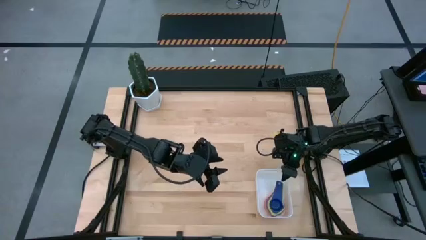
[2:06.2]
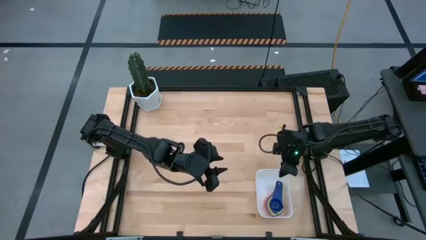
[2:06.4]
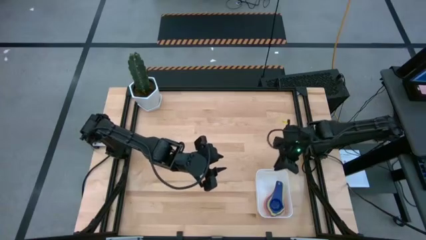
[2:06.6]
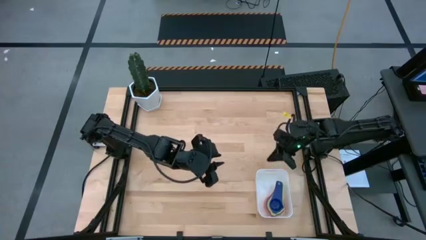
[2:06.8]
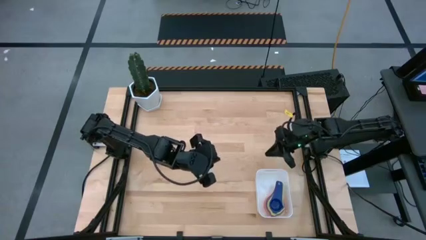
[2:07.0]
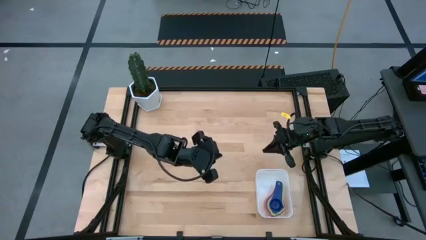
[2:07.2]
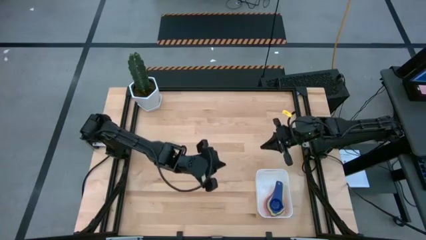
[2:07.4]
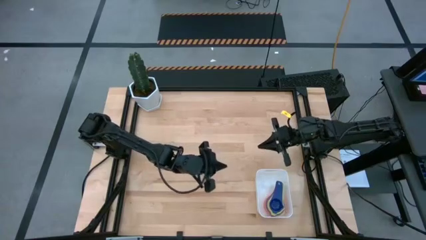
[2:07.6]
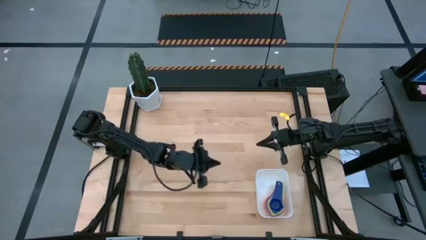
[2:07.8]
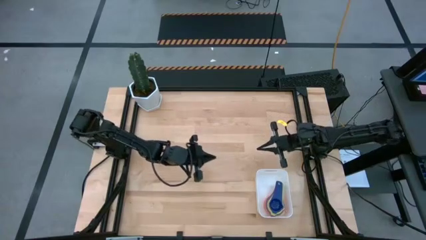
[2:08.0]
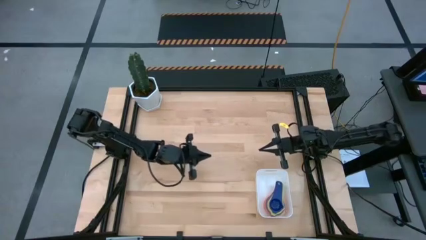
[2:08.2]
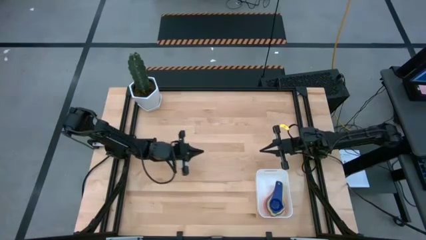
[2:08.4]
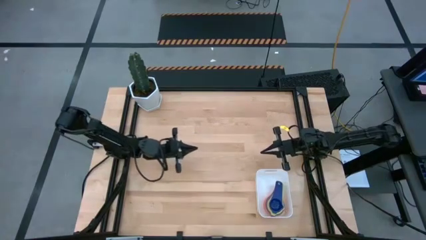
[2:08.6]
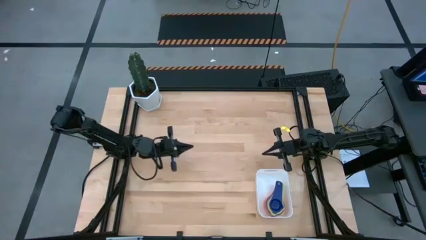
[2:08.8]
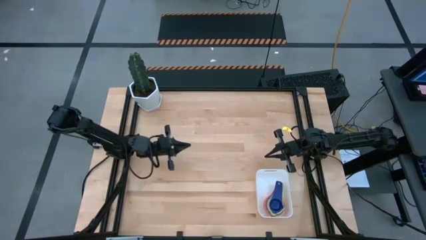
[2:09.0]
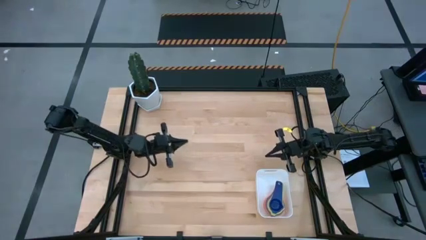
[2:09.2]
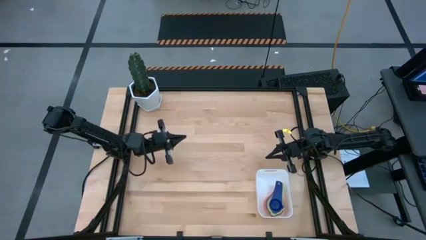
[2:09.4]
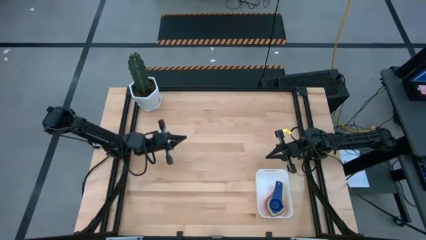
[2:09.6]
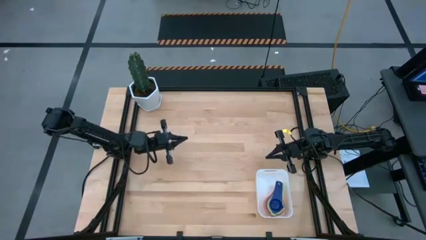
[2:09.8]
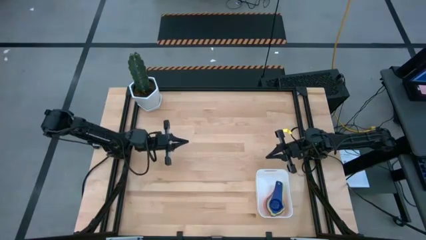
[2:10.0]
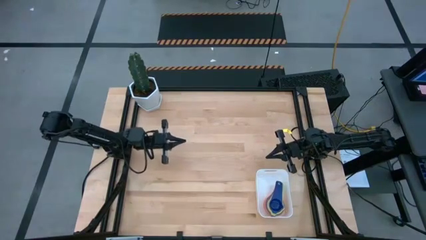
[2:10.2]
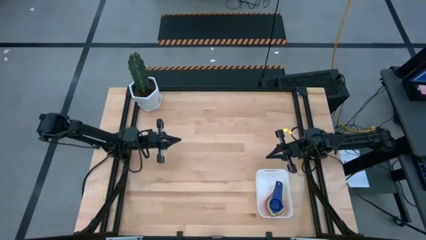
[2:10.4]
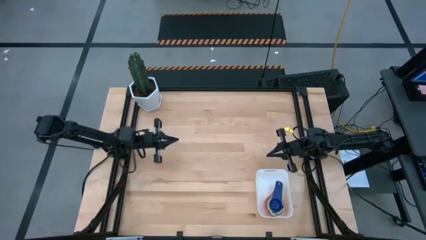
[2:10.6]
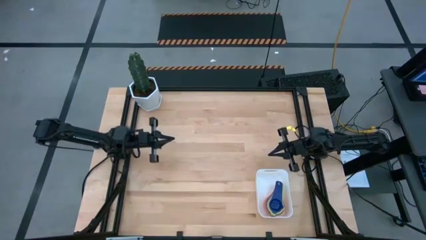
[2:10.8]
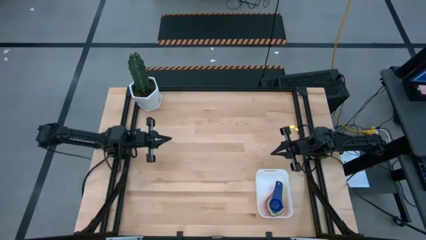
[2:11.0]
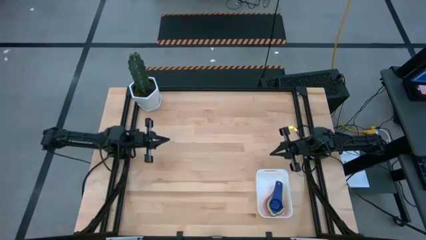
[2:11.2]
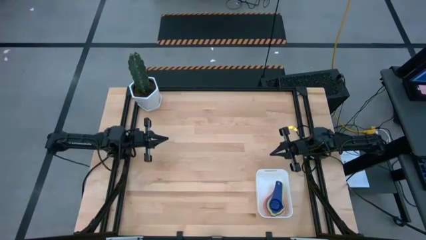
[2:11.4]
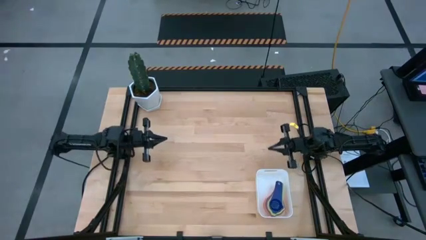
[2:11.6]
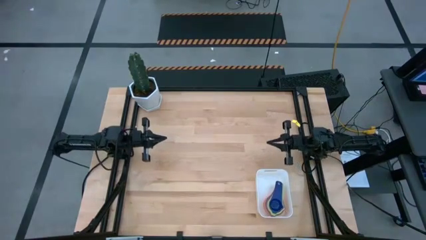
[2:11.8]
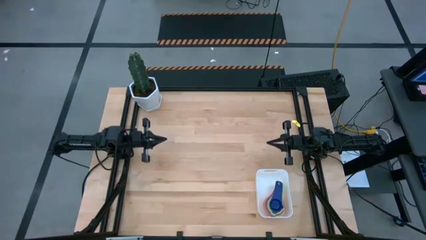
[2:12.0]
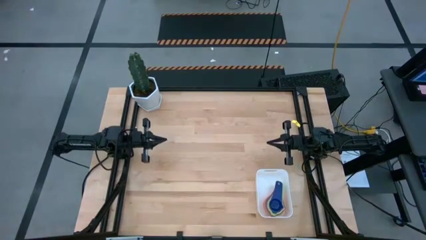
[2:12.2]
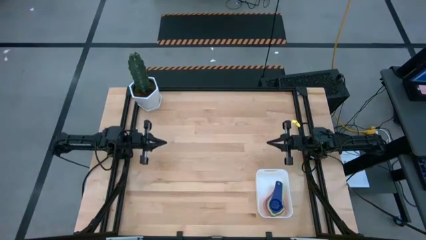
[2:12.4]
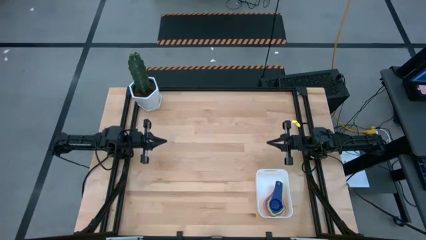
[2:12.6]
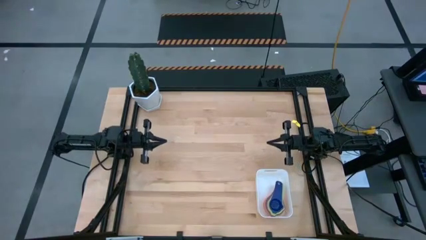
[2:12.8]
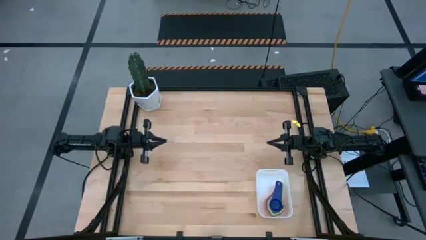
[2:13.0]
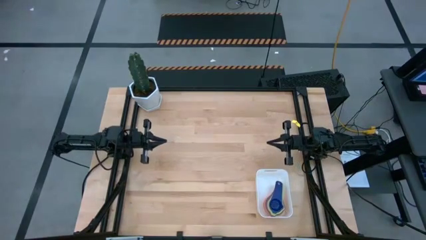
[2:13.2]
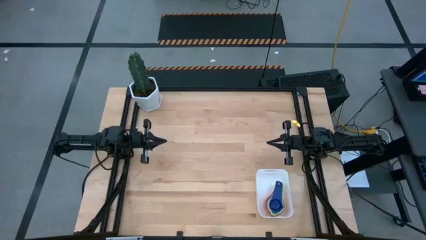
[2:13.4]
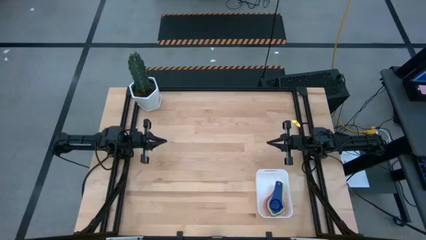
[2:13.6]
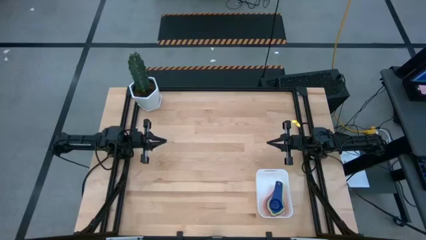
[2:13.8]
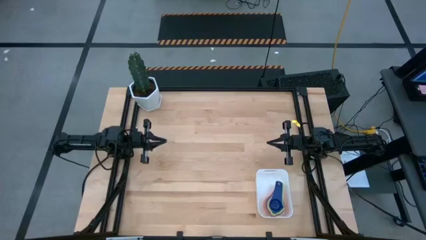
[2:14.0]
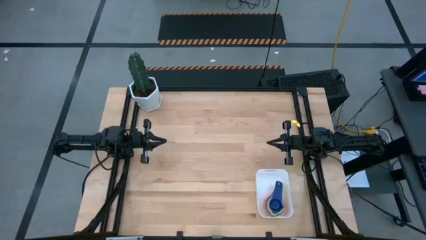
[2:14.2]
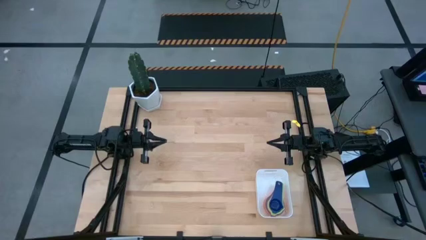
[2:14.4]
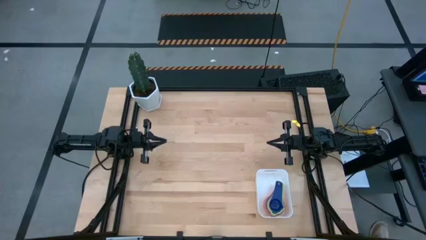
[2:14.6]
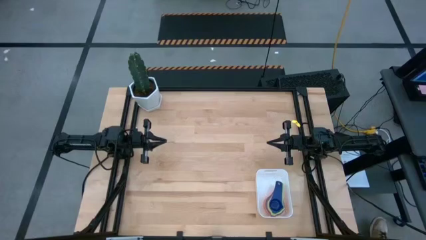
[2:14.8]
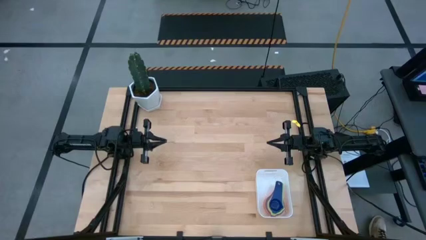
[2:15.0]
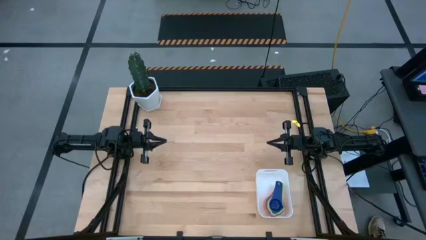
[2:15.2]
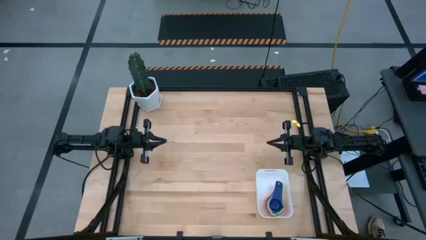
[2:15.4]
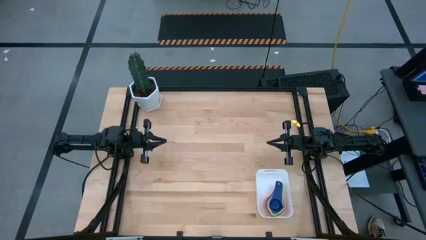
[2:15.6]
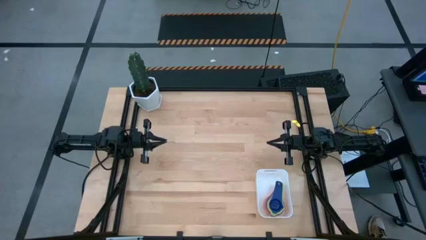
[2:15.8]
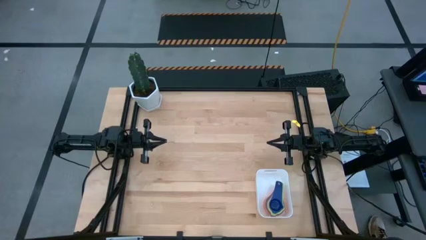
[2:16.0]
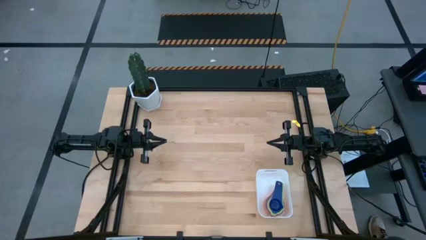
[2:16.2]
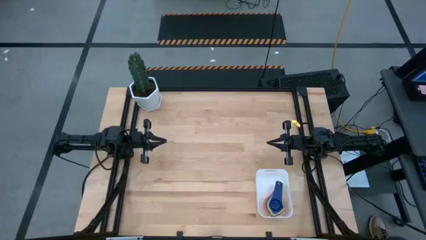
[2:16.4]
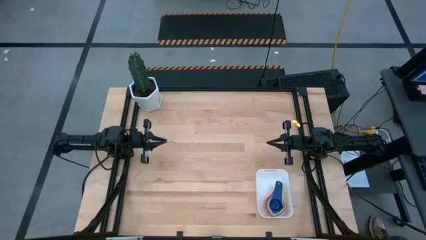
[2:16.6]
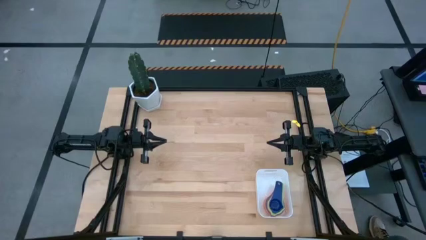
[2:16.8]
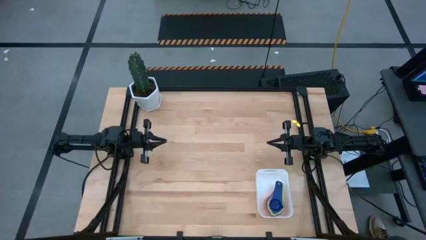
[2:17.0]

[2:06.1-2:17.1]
Task: Nest measuring cups in basket
Return to Home Position
